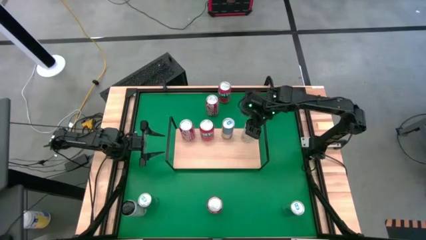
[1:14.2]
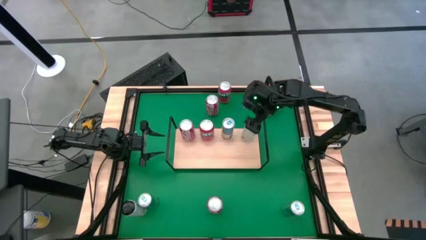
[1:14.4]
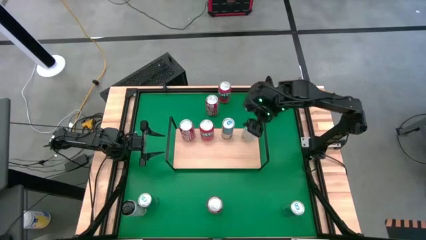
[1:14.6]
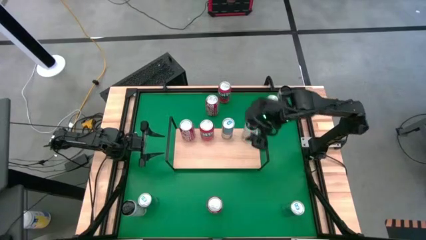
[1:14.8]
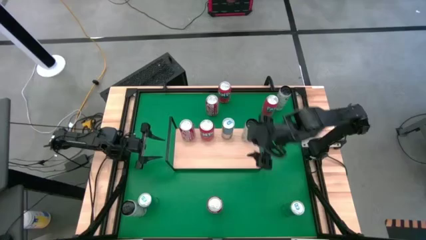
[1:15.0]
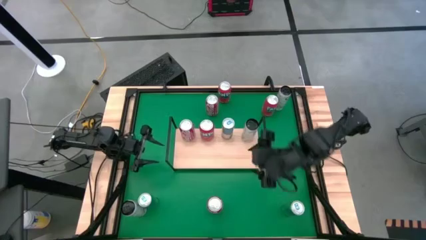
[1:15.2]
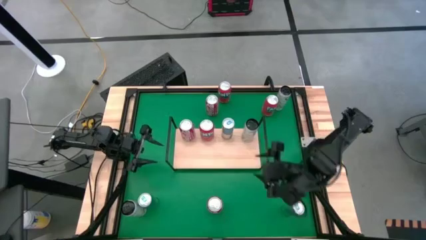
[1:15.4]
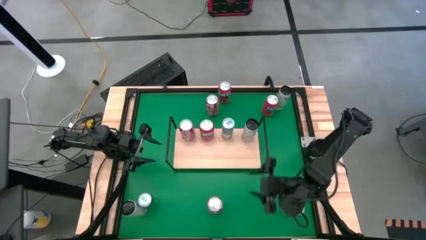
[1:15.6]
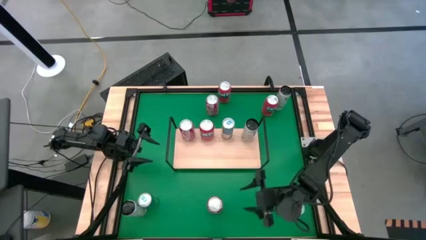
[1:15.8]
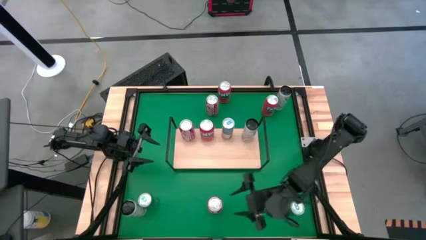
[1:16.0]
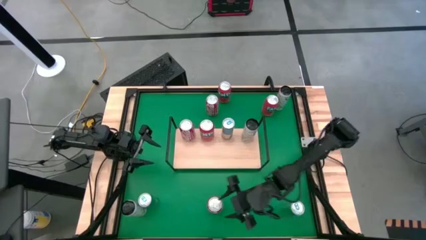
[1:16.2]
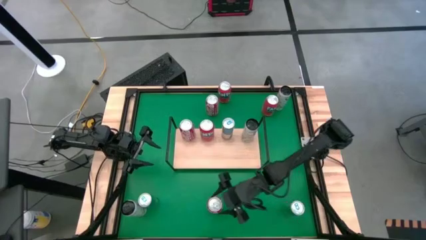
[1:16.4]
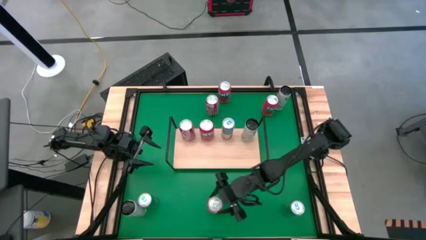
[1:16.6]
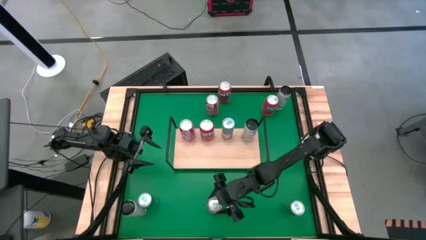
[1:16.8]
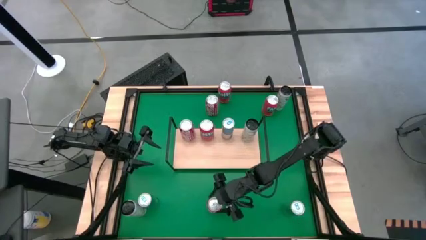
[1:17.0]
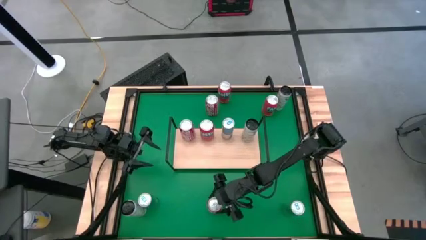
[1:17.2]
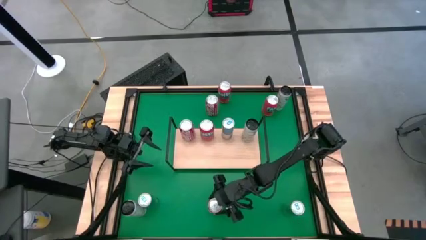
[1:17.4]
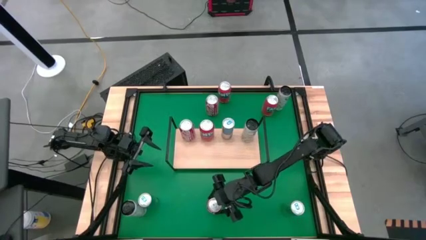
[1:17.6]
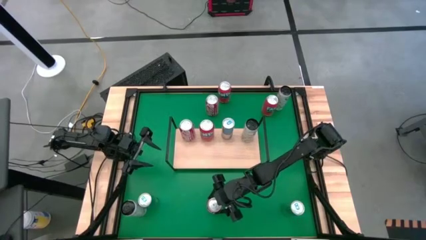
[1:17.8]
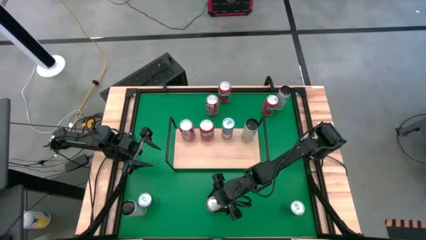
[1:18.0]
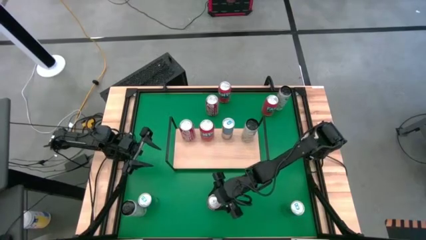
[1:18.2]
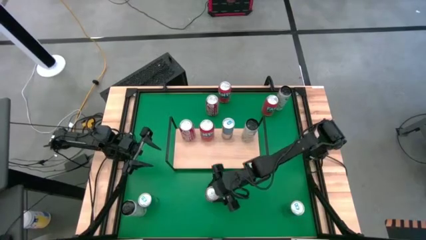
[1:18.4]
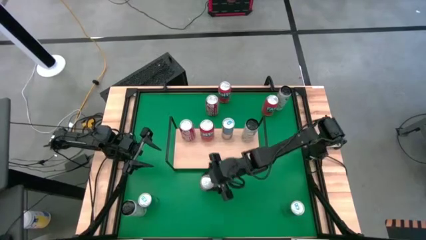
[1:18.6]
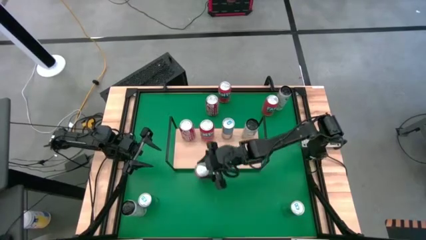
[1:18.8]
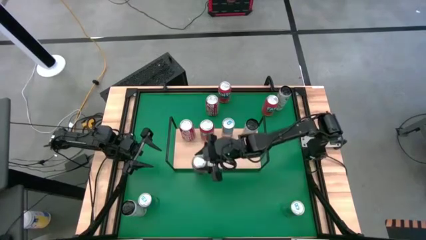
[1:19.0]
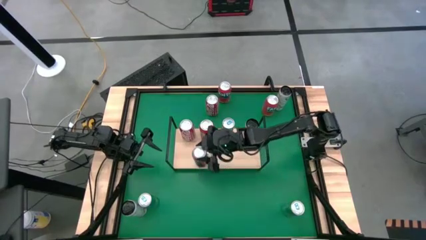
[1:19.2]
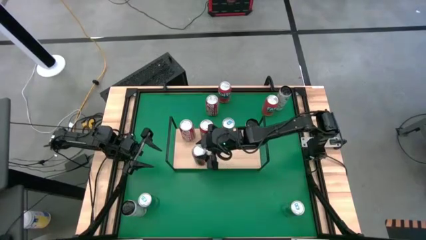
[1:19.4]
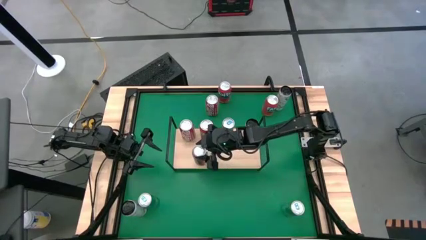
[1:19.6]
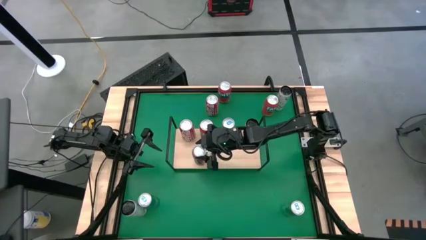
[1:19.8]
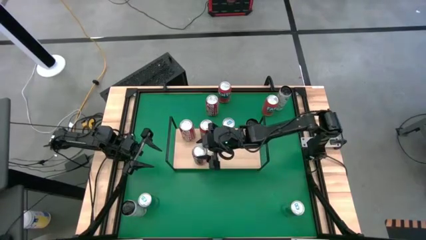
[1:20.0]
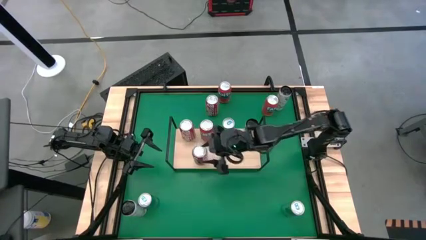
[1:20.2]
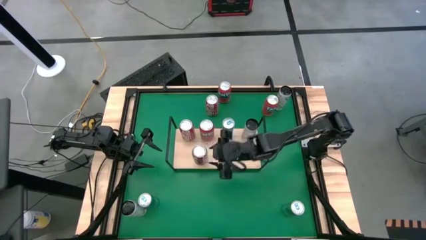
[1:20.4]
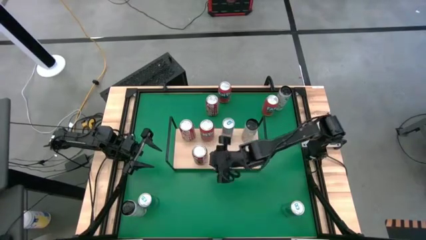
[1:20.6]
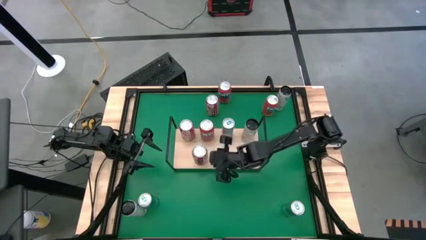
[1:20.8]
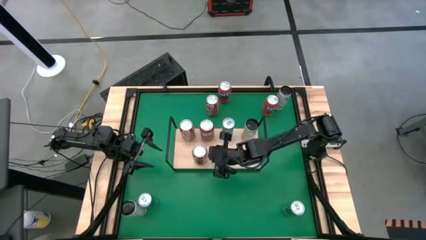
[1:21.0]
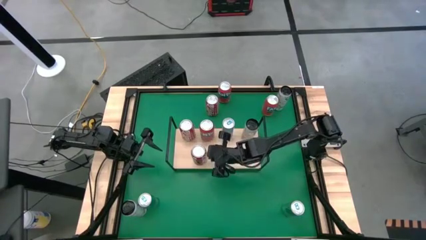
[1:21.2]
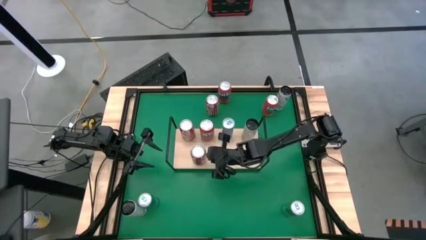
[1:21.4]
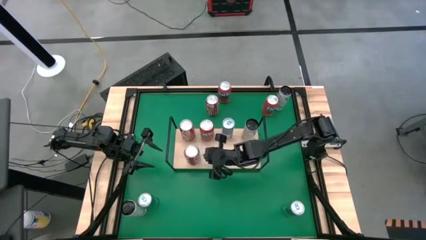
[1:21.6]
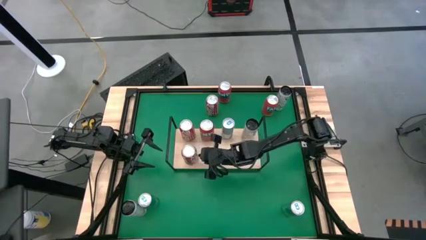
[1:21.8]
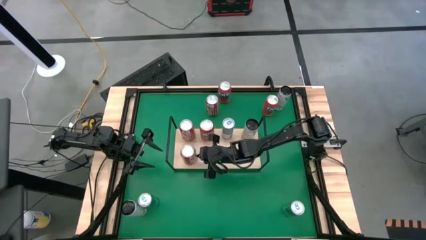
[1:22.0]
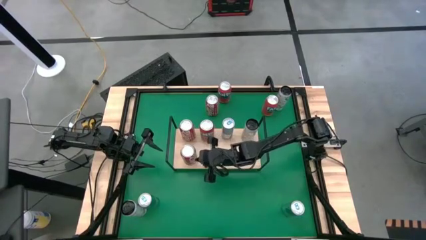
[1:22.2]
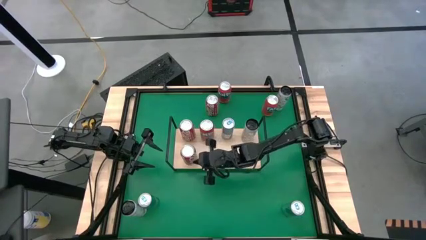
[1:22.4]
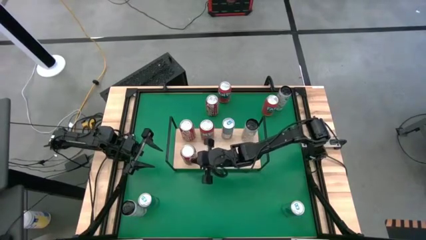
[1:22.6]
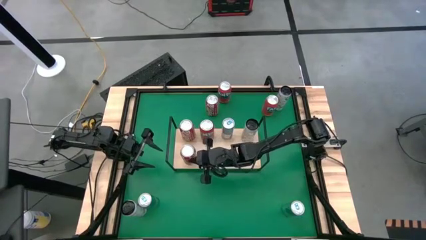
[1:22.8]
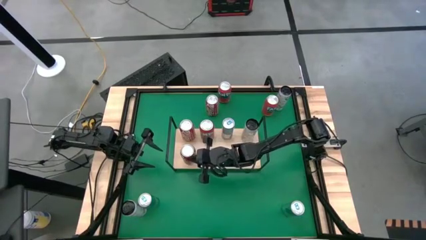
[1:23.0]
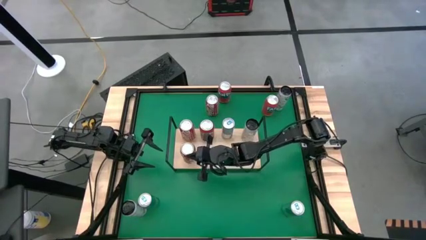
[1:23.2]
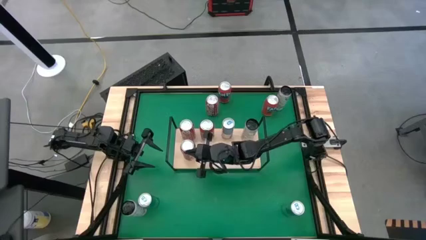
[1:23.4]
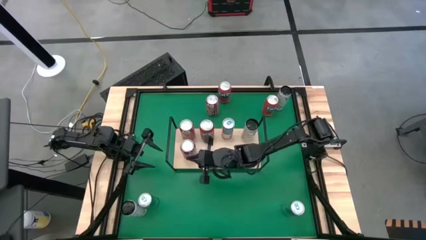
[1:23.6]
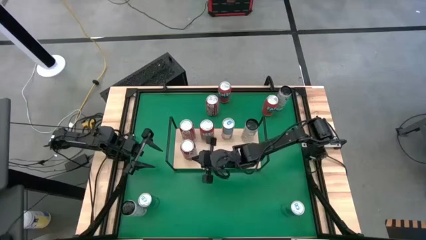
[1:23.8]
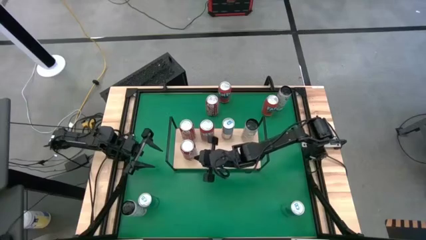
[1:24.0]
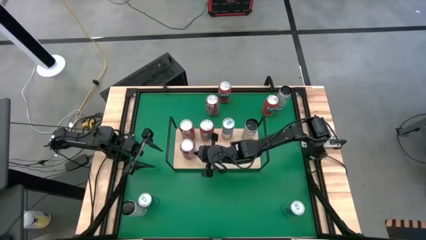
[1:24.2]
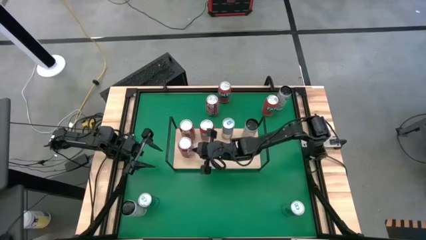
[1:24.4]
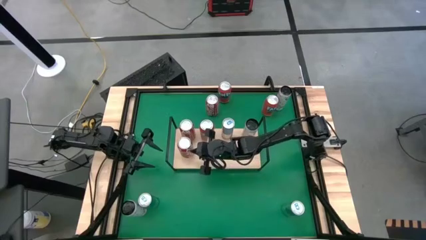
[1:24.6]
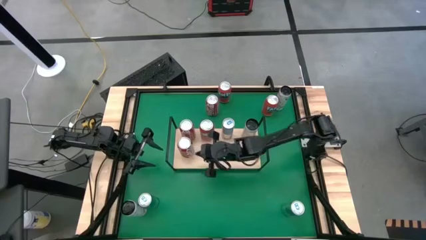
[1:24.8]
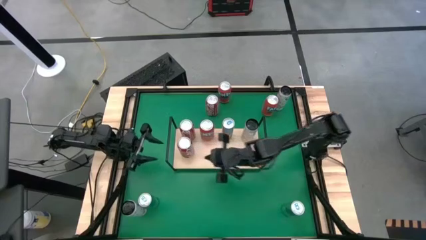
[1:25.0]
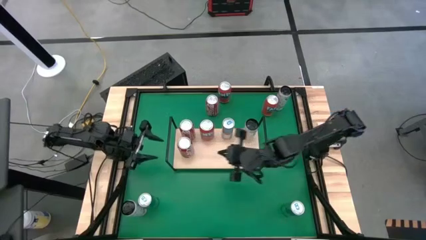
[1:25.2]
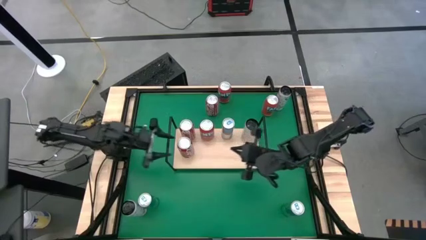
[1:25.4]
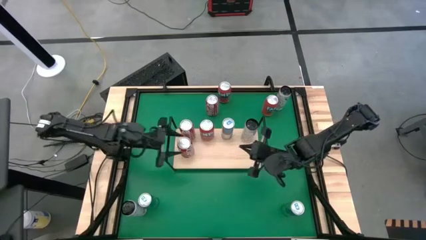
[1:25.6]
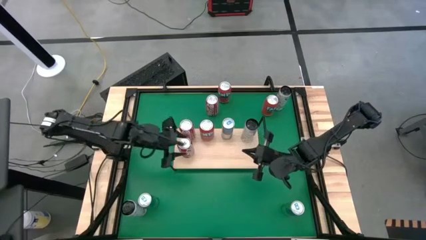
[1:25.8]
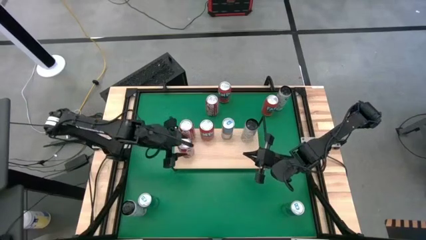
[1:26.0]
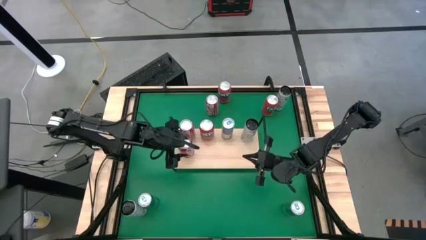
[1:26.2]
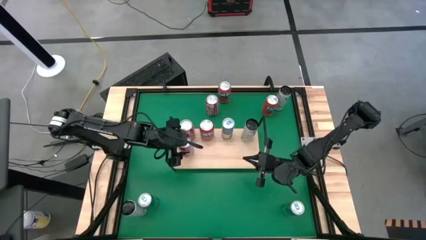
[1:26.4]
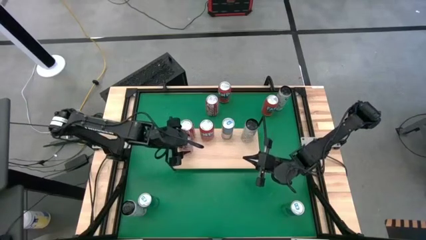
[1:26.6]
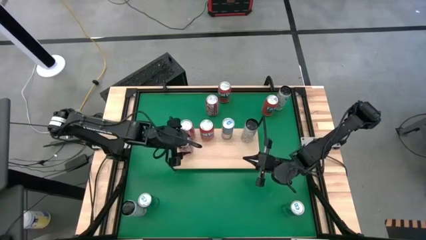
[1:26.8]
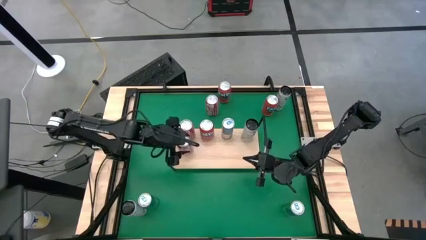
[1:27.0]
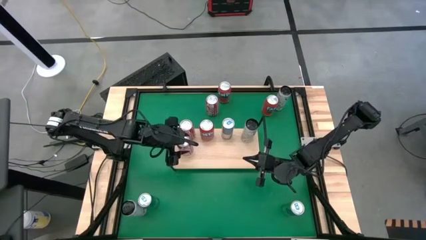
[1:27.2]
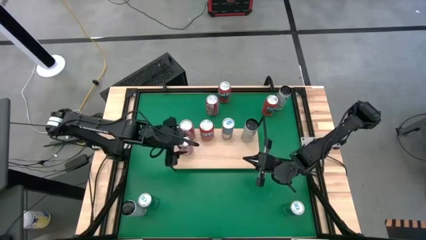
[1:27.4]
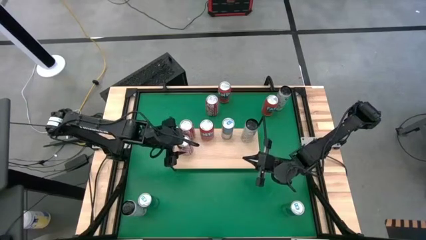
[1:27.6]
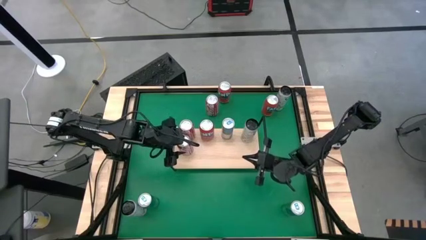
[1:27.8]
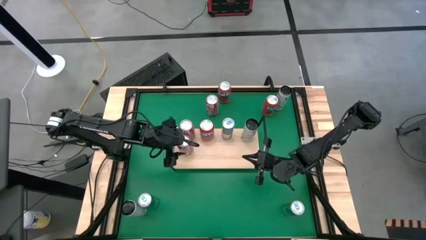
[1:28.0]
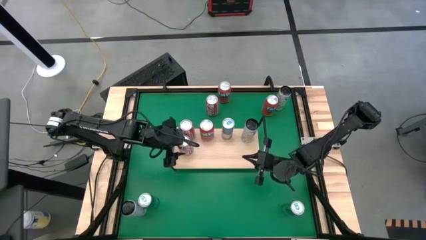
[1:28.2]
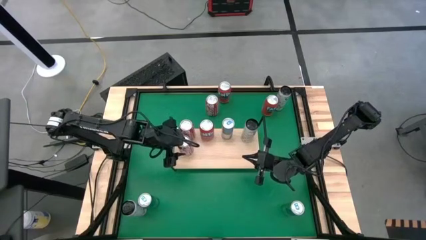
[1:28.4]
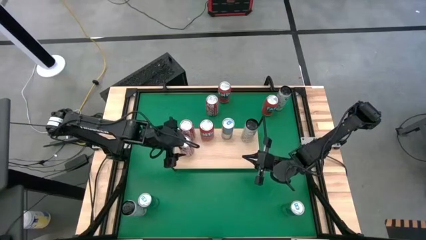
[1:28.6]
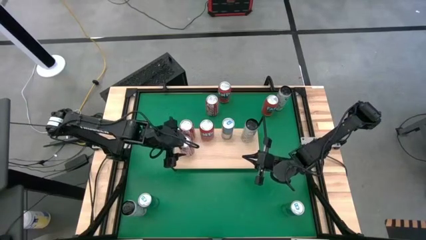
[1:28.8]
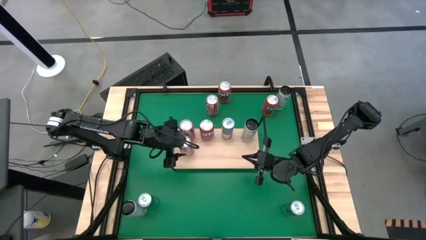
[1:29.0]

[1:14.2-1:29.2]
Task: Place canned beverage on shelf
Put the bottom red-white soda can on the shelf aligned with the other red-white soda can
